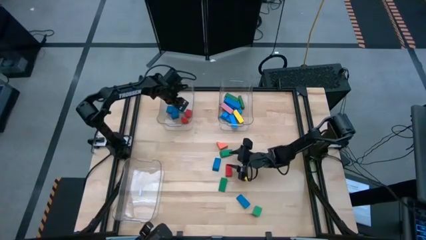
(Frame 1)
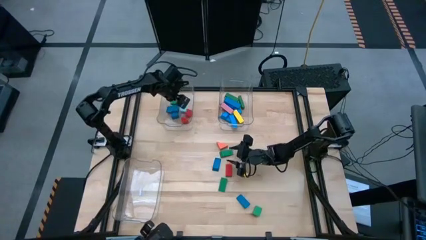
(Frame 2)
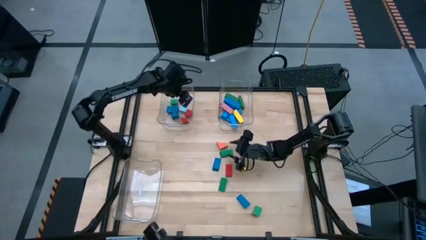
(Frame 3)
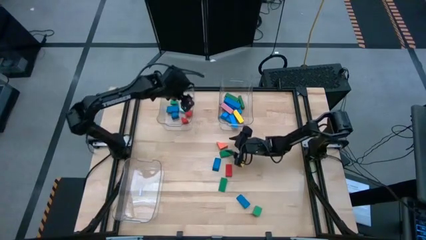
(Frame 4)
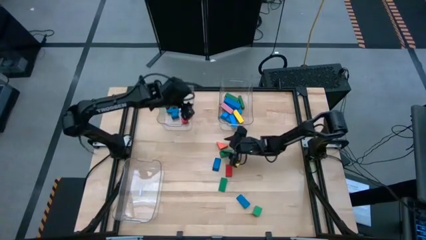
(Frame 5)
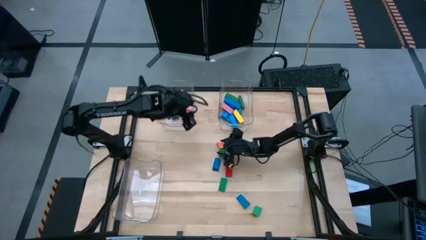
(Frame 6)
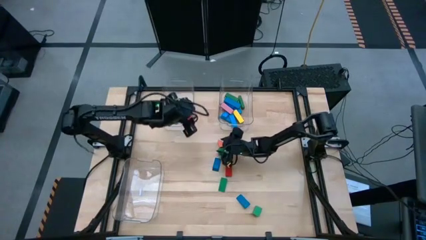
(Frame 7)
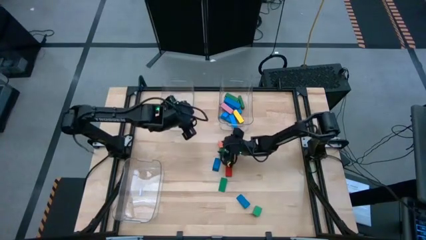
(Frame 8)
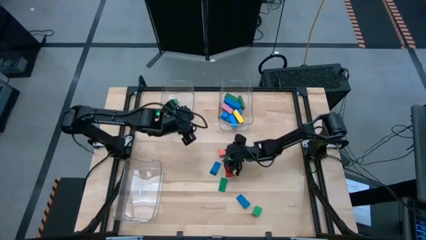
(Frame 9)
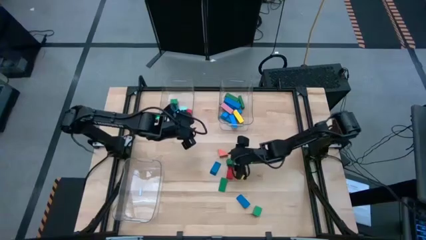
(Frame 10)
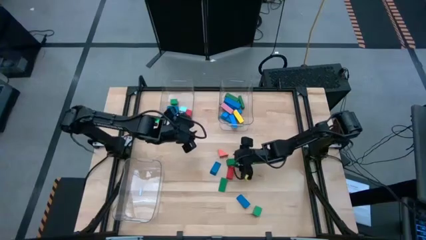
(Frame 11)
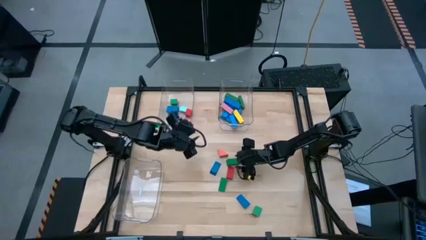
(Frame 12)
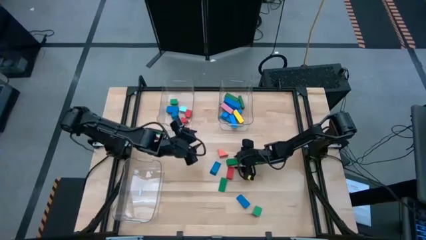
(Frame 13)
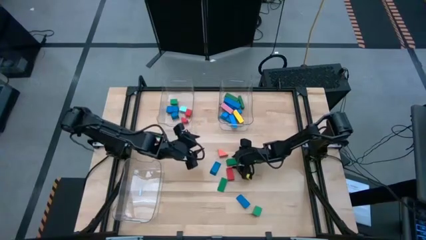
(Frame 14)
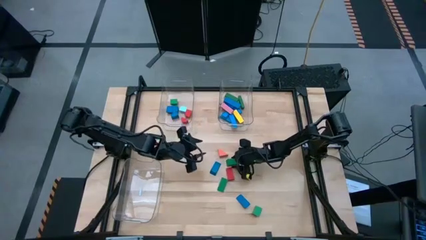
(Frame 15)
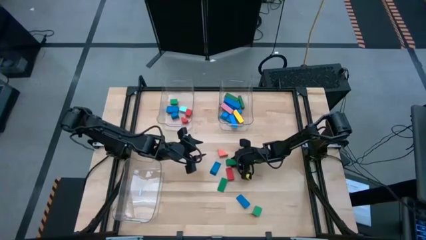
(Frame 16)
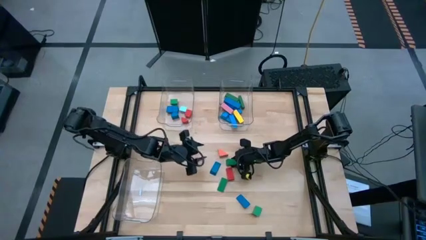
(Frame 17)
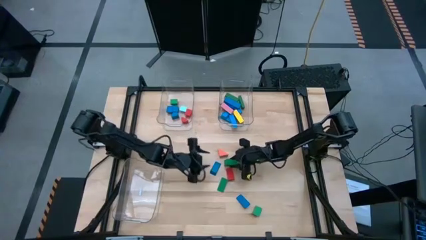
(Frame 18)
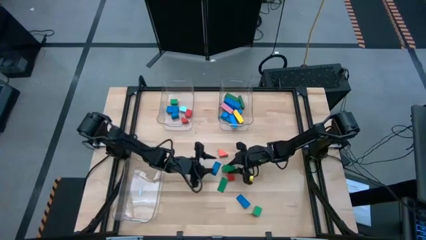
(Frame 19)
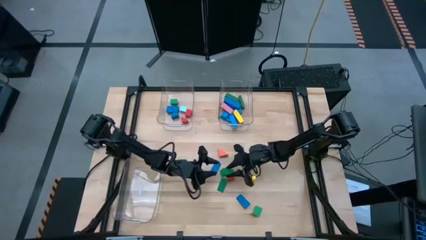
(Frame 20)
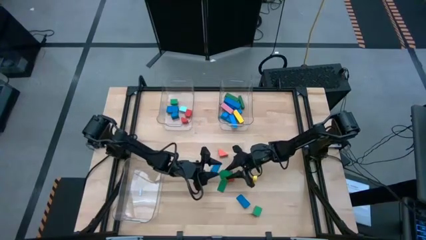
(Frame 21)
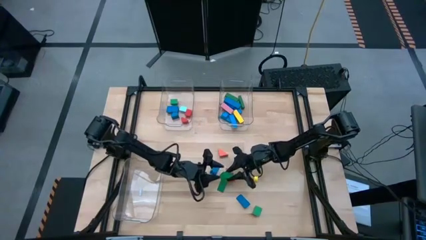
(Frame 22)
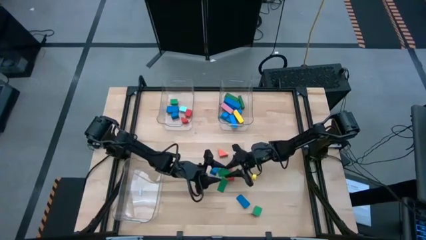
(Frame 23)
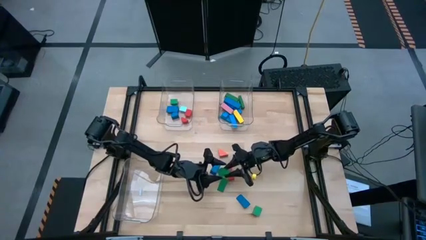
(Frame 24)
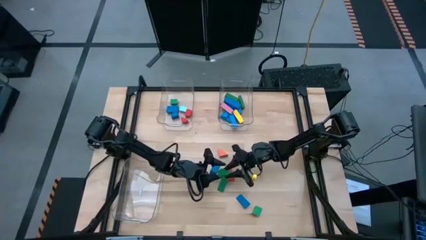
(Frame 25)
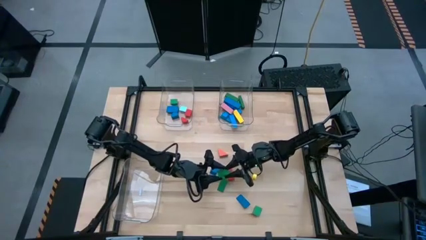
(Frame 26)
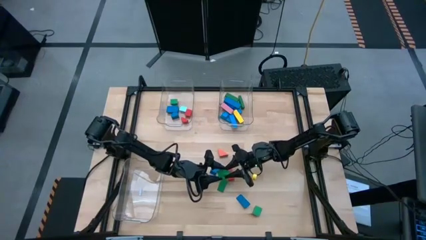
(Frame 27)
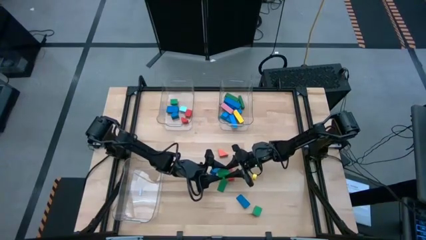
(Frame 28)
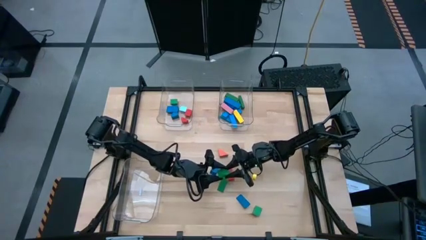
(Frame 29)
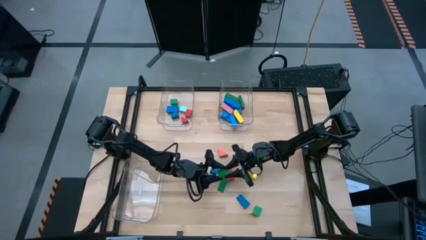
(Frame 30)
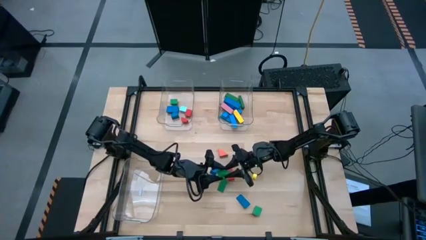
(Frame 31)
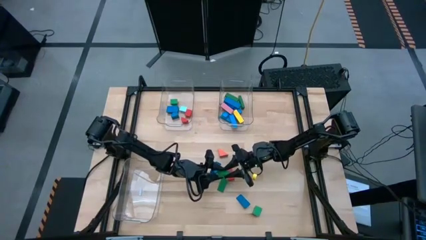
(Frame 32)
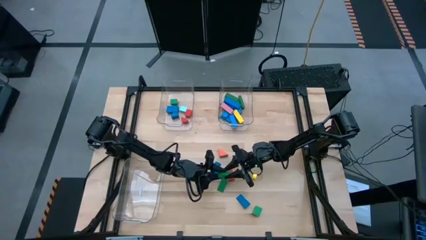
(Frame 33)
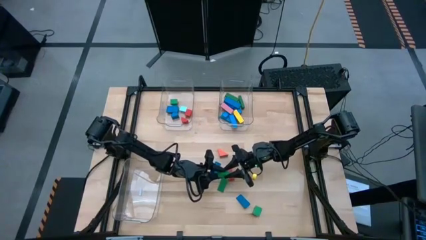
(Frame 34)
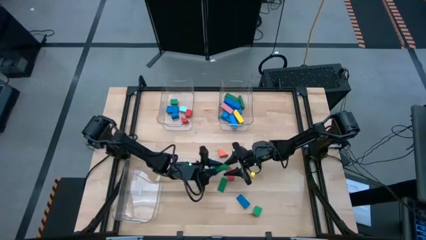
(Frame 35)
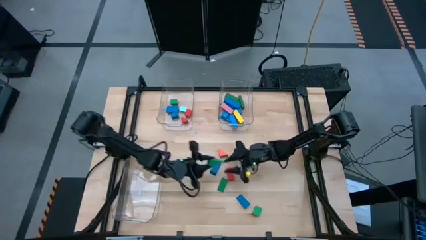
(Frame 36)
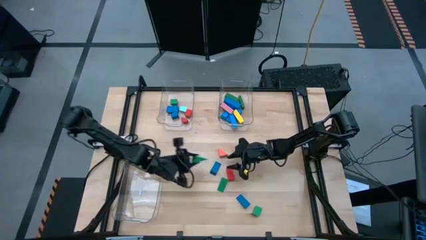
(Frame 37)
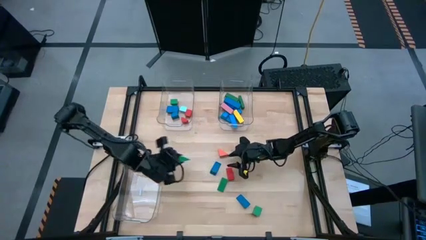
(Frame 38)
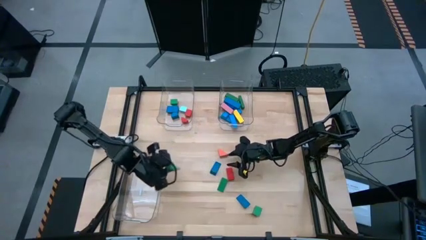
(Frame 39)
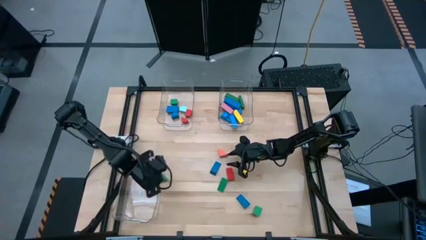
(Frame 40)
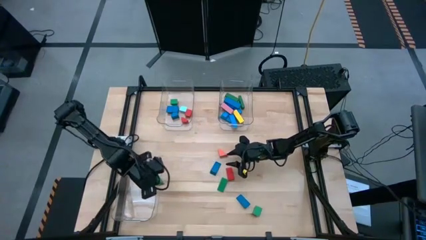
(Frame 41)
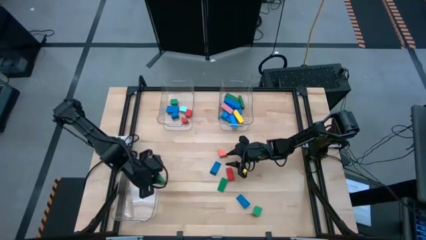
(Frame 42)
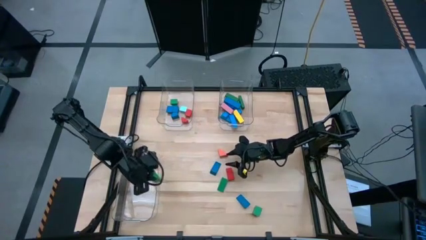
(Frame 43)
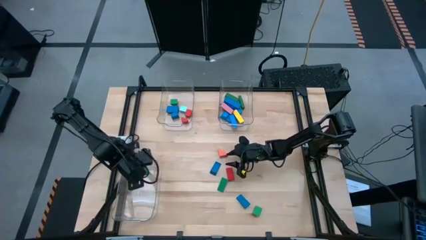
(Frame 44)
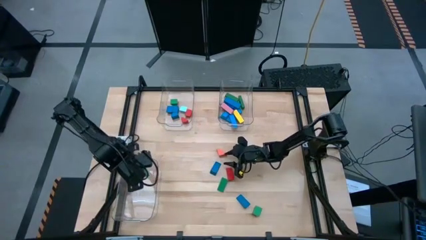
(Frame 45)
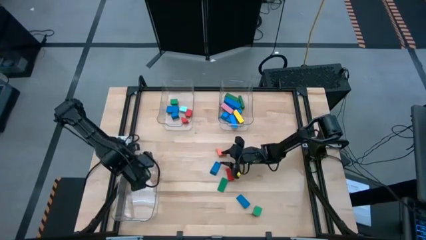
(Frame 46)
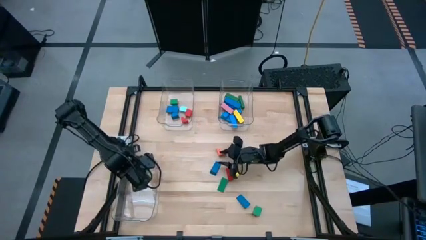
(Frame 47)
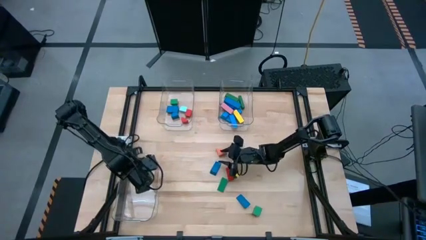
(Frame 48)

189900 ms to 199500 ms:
Task: Sort blocks by size
Put the green triangular block into the bottom transparent bin

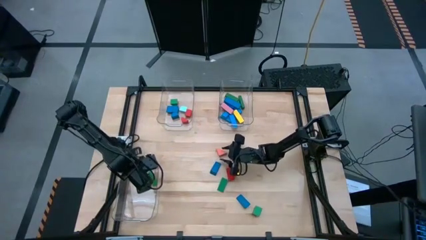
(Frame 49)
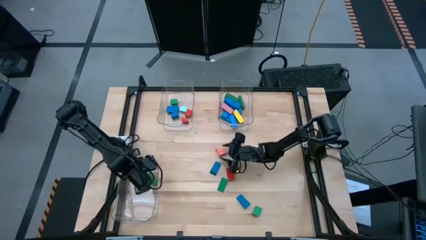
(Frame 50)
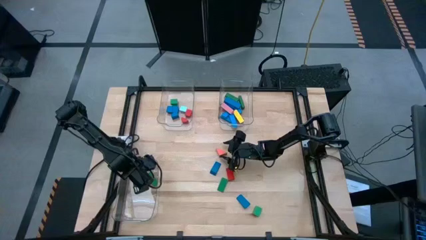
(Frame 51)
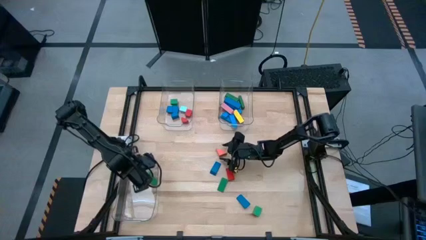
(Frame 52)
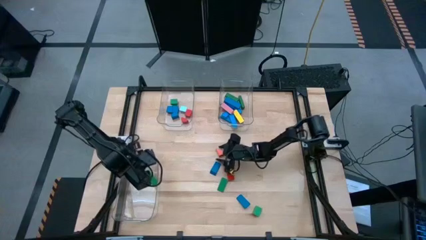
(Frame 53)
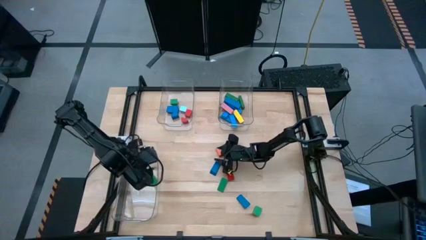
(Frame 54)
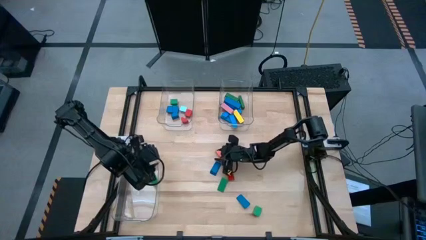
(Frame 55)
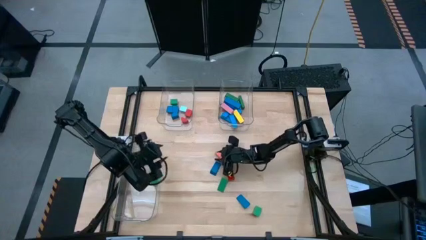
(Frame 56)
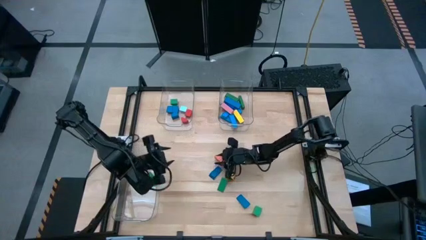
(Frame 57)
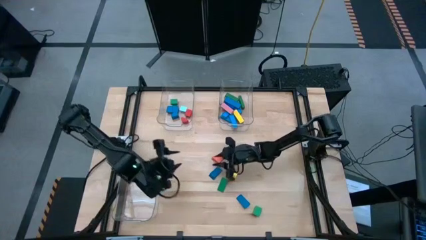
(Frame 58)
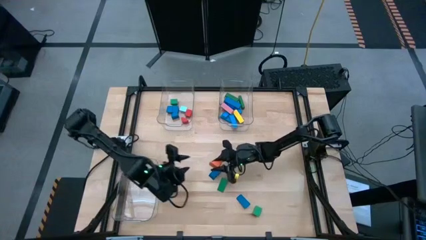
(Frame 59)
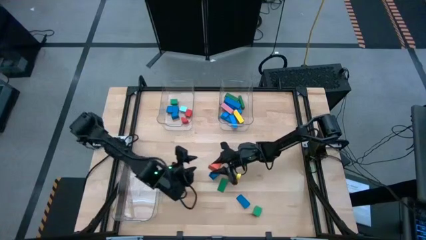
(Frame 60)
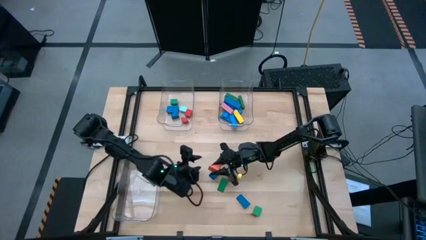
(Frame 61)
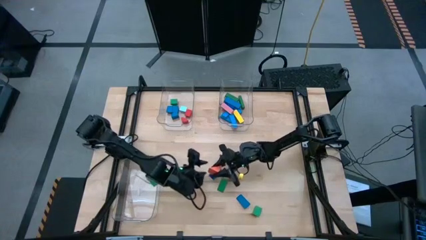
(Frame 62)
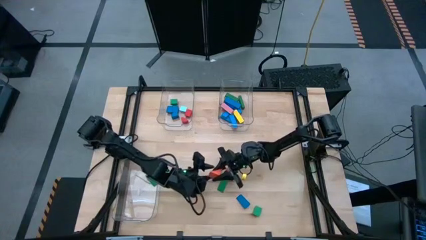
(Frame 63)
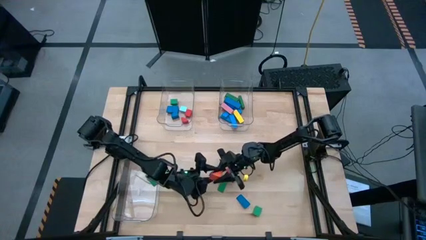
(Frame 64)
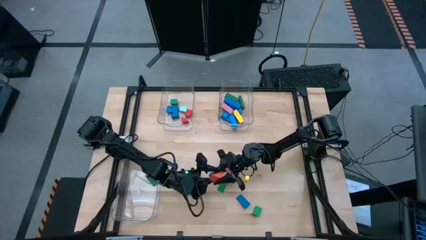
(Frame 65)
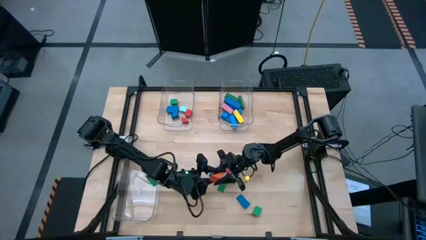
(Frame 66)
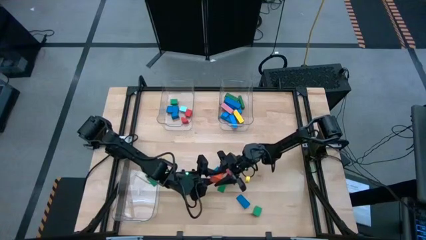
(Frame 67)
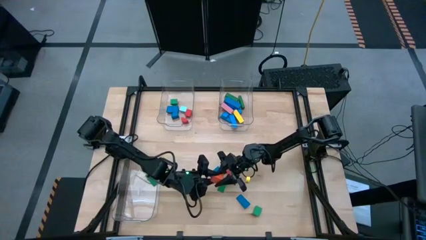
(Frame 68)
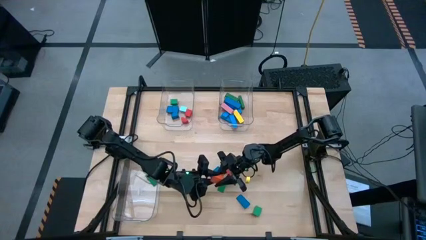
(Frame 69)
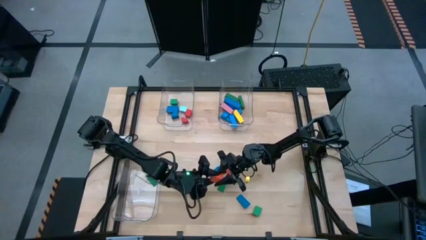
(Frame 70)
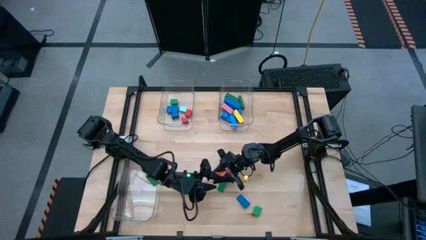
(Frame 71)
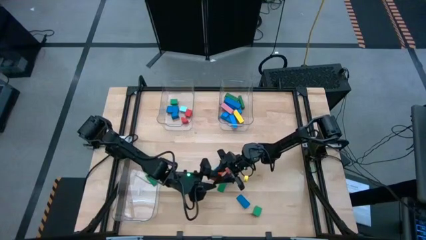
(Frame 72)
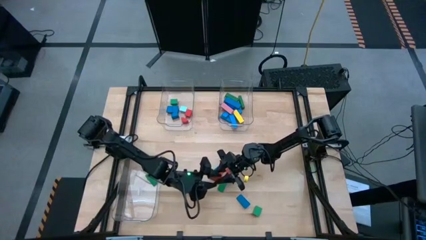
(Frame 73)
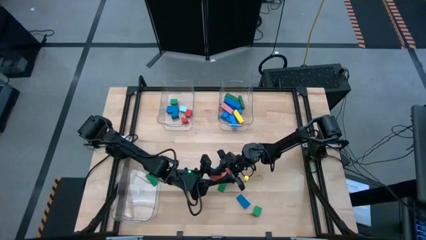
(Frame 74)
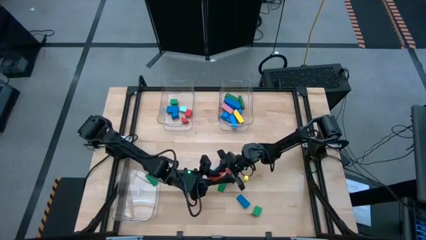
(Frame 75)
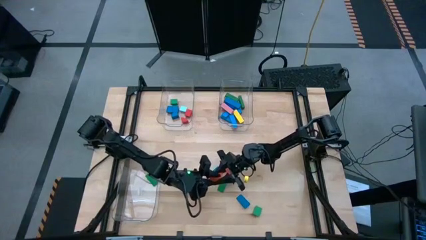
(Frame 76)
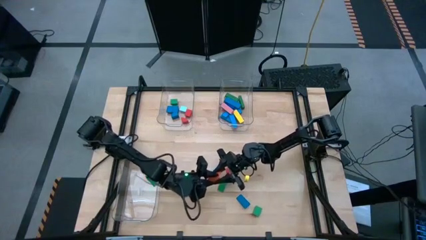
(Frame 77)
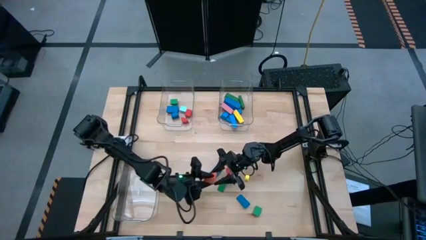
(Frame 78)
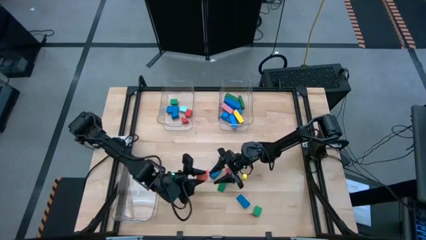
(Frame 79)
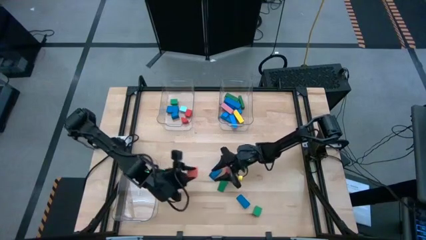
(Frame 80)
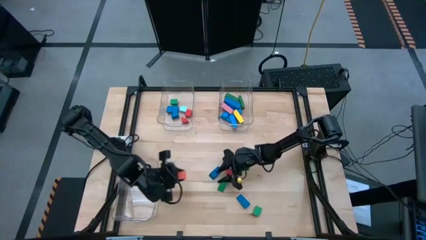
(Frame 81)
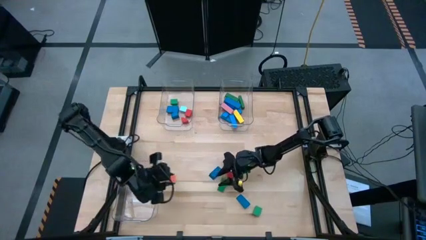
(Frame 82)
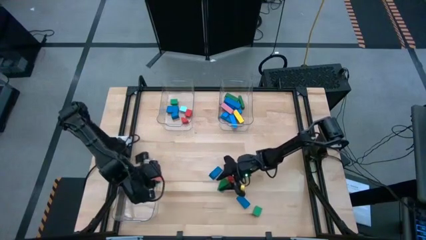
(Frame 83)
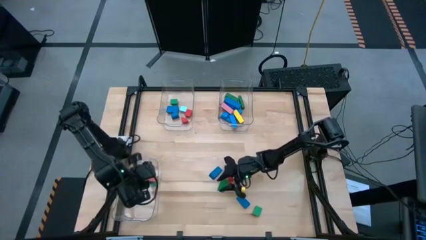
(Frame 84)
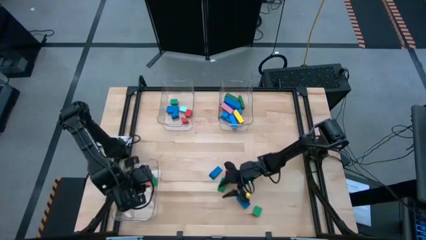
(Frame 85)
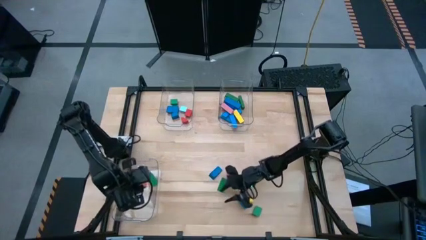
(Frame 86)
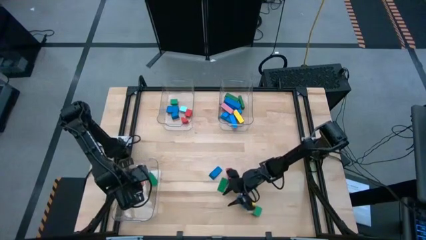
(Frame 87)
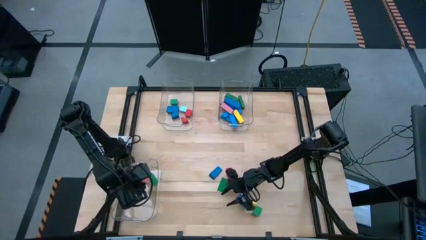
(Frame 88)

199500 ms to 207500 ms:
Put the orange triangular block into the bottom transparent bin
